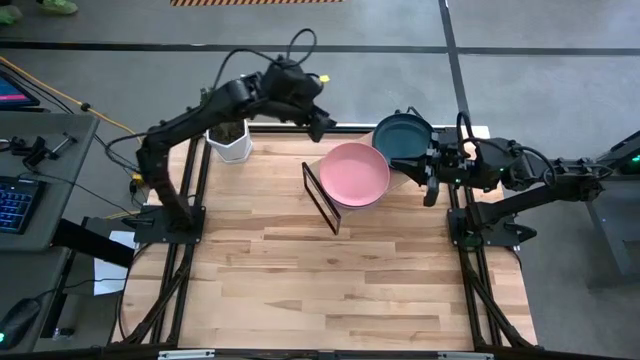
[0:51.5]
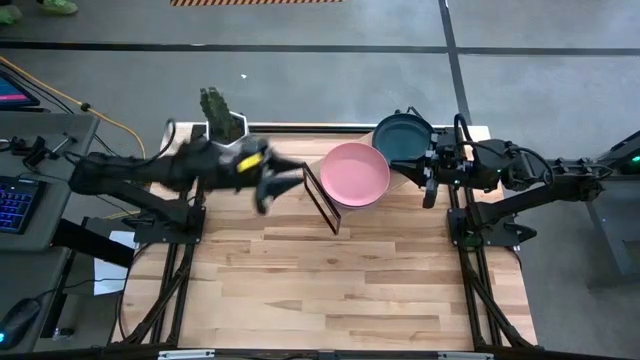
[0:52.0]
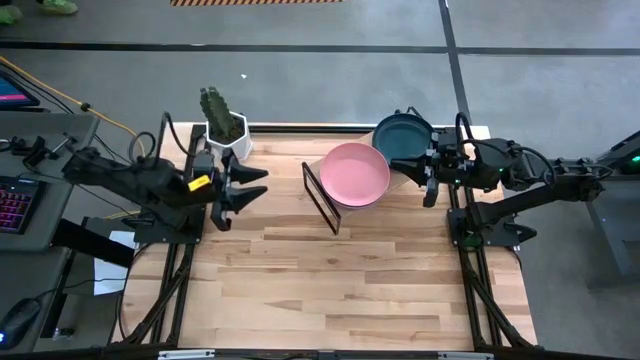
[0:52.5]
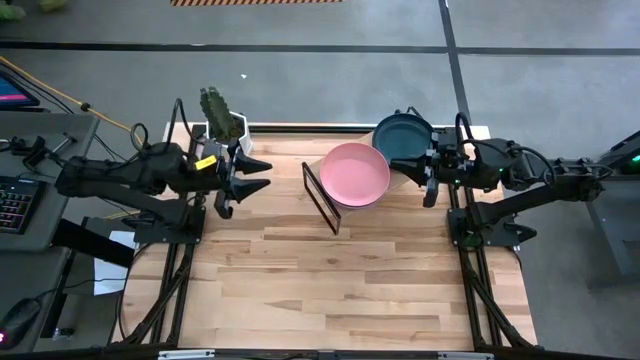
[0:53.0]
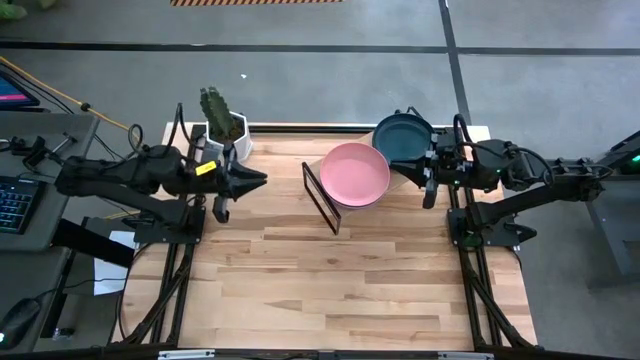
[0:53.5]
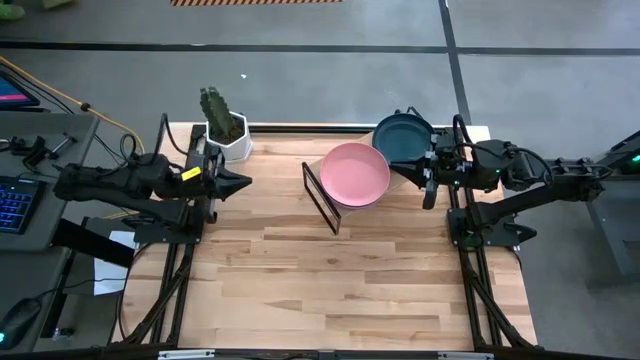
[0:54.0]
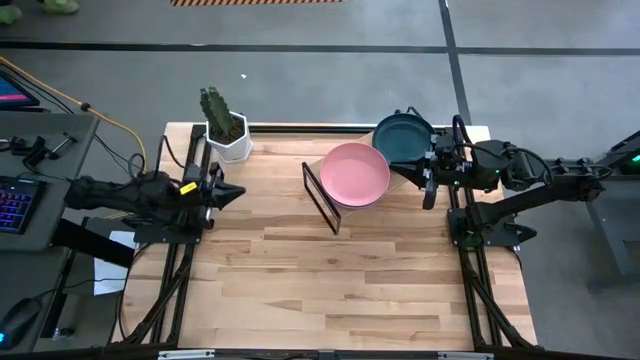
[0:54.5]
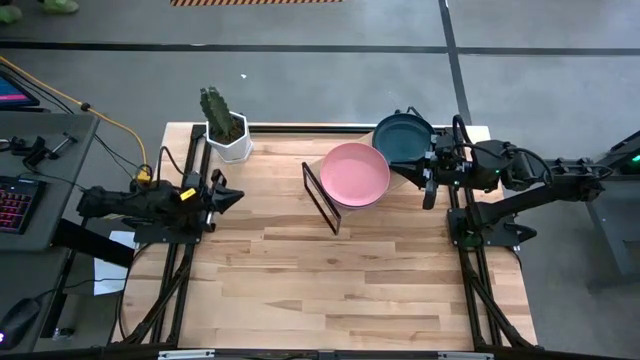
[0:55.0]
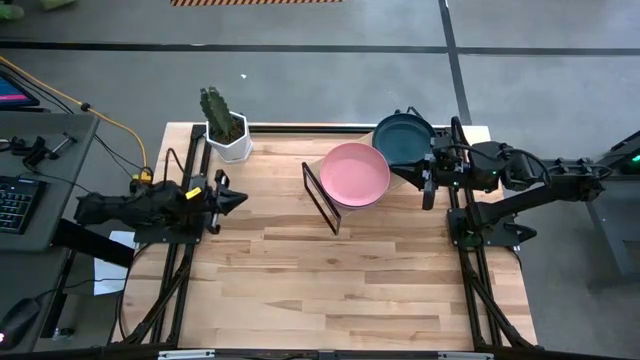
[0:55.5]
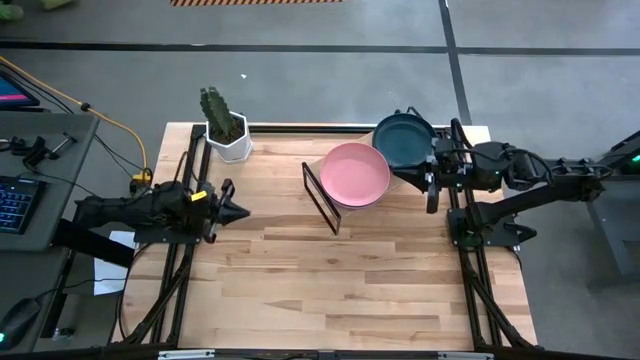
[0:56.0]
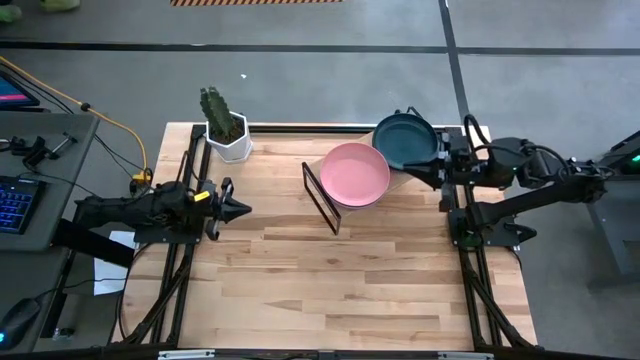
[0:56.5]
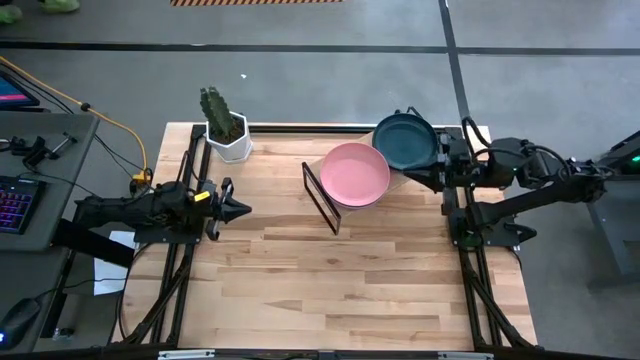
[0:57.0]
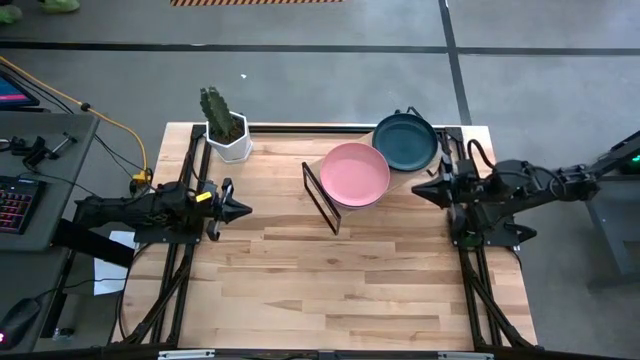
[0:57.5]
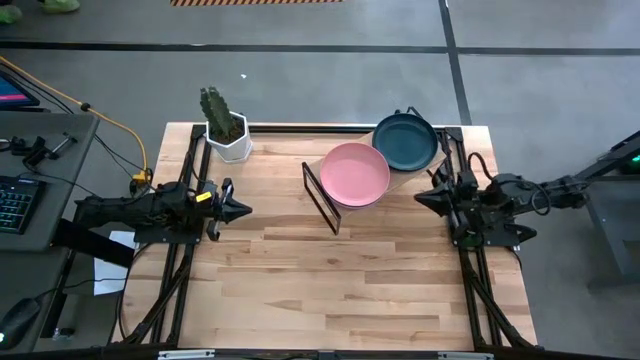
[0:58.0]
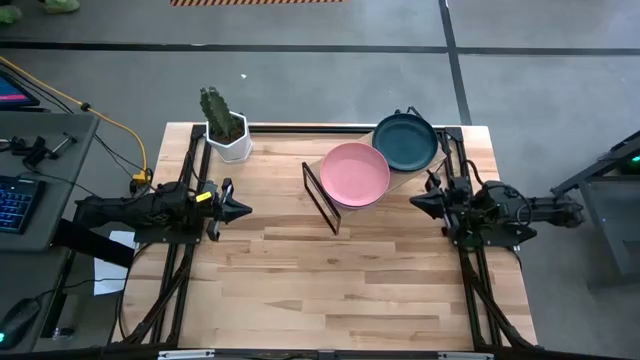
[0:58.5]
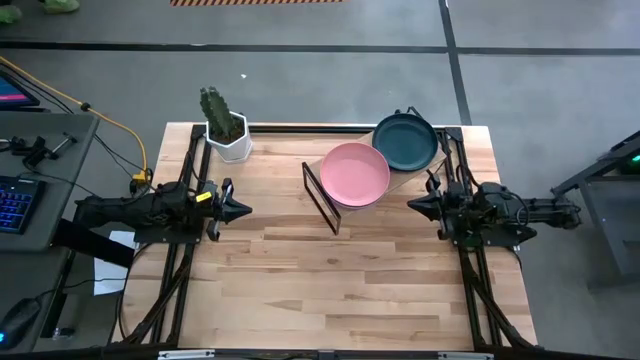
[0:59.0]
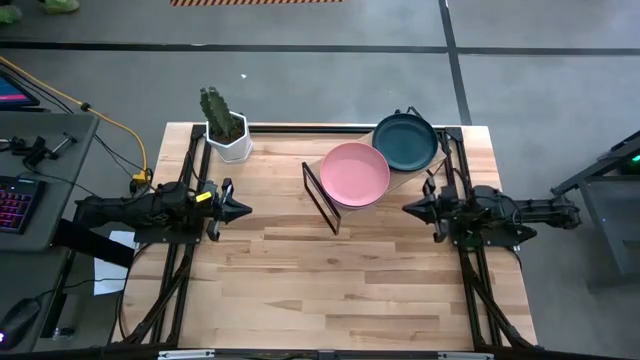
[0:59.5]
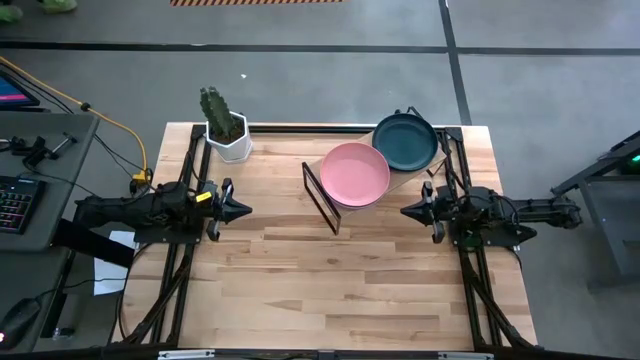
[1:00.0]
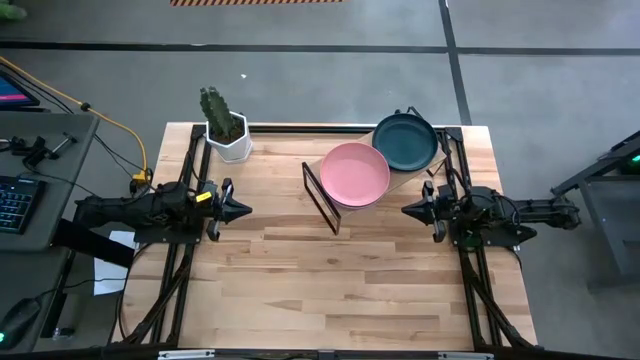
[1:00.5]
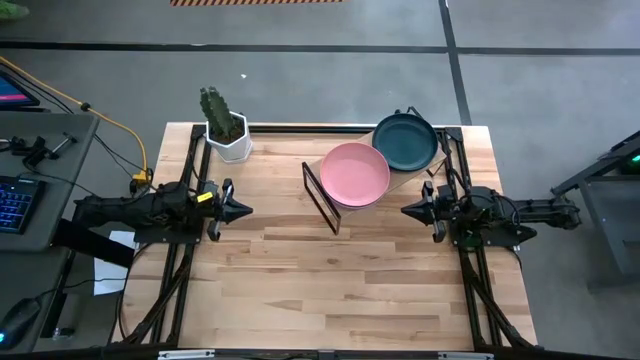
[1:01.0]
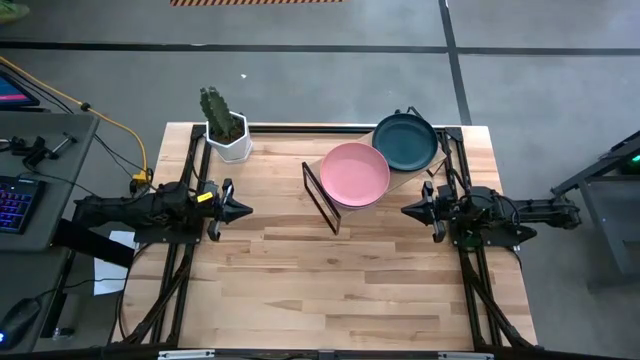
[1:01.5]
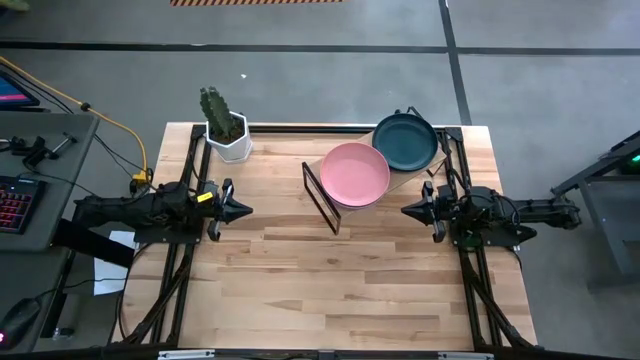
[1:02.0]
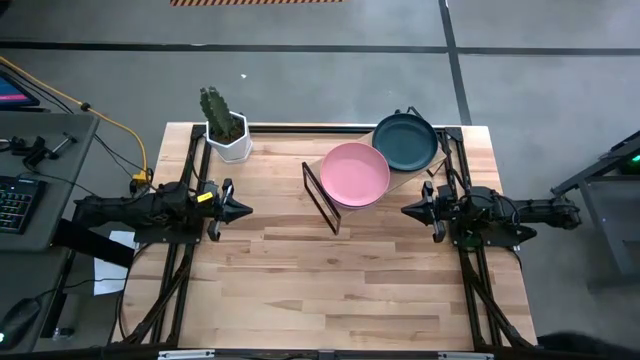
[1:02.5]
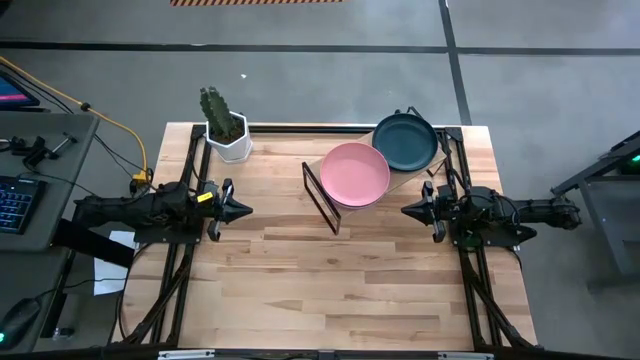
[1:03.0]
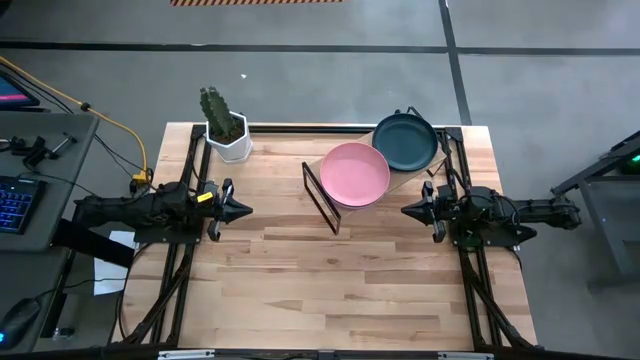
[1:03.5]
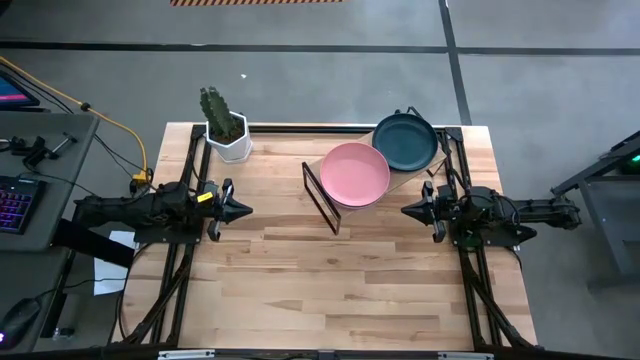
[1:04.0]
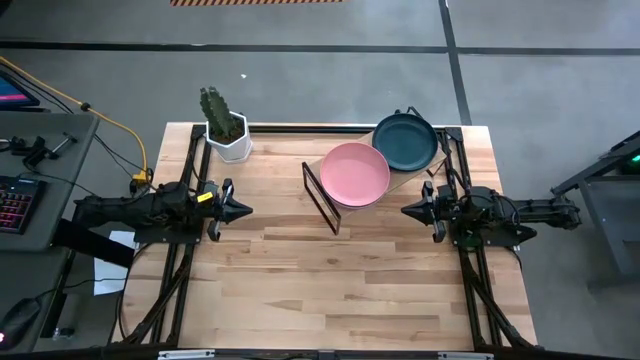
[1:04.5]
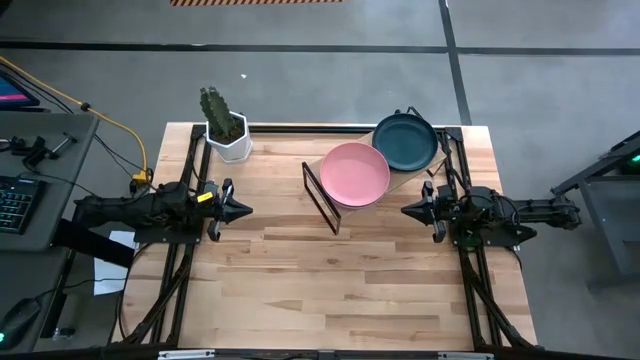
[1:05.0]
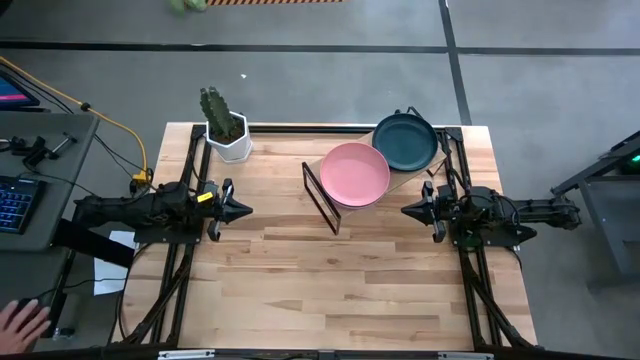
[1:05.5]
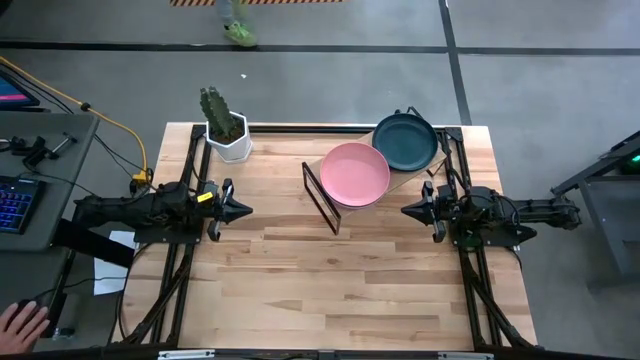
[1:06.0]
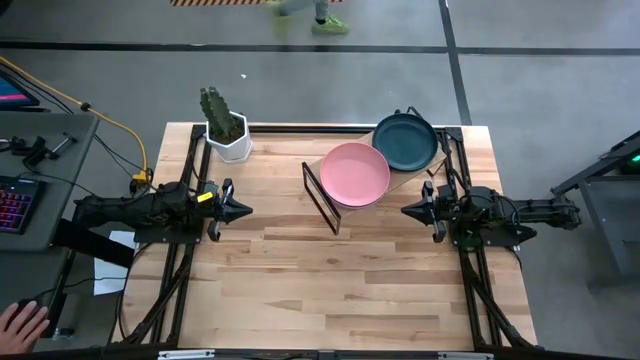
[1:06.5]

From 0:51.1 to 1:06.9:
Task: Place and stack plates onto a shelf
Return to Home Position

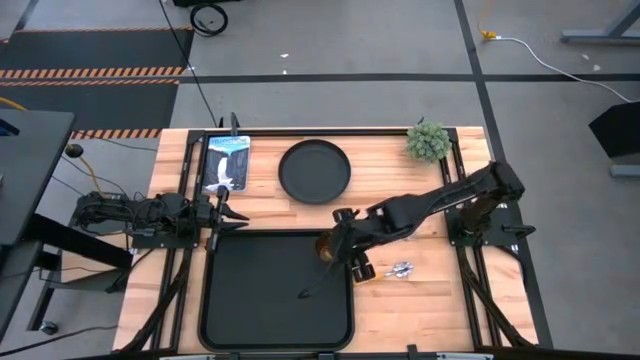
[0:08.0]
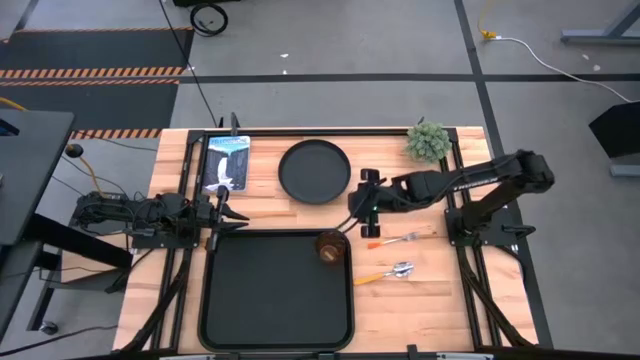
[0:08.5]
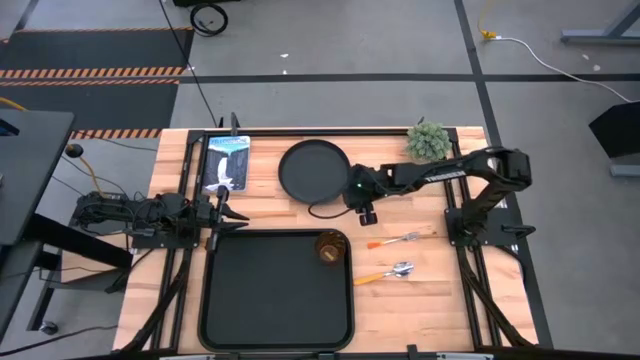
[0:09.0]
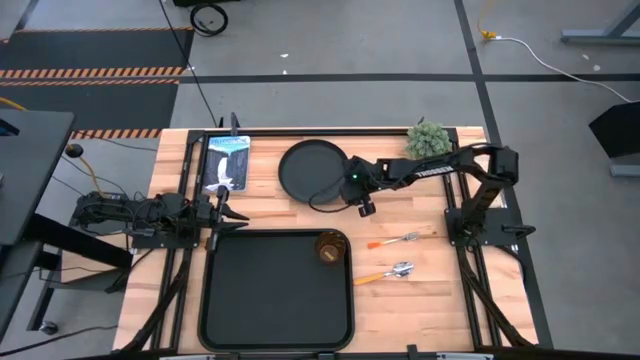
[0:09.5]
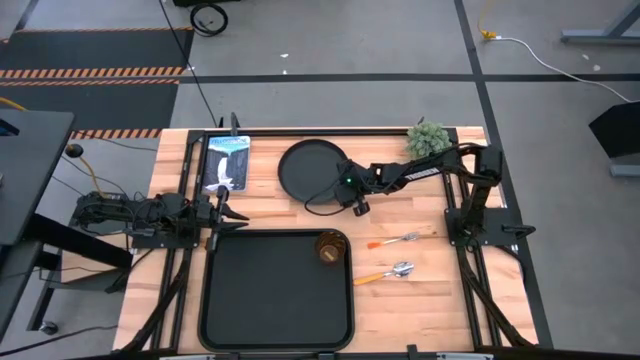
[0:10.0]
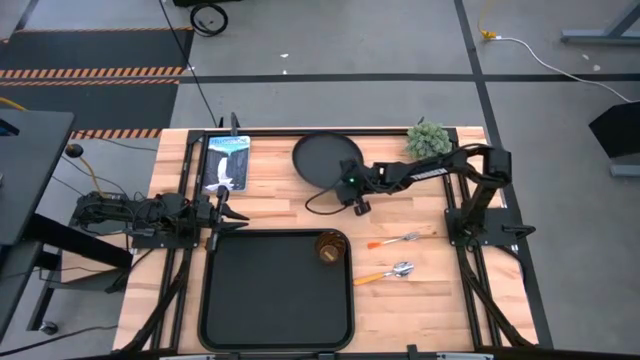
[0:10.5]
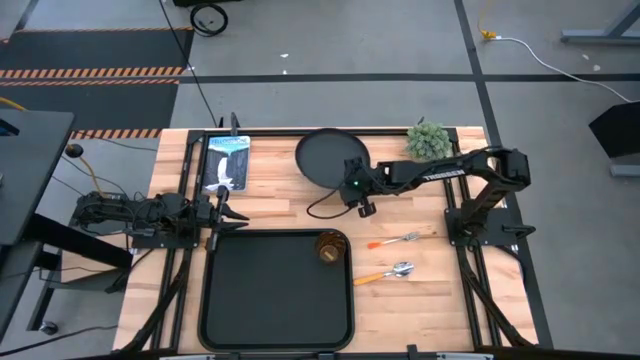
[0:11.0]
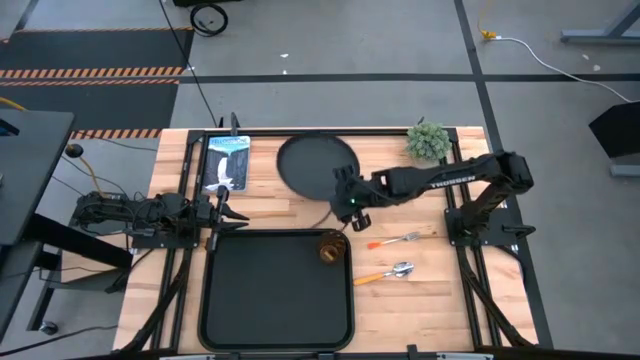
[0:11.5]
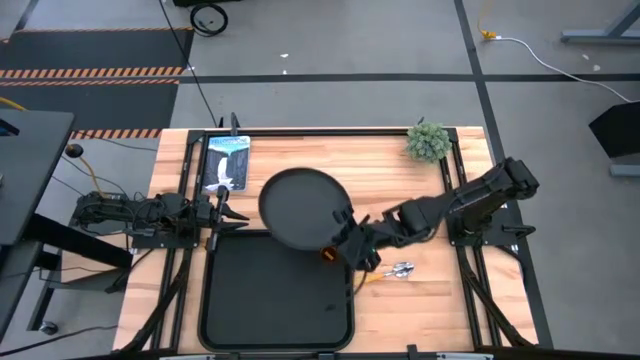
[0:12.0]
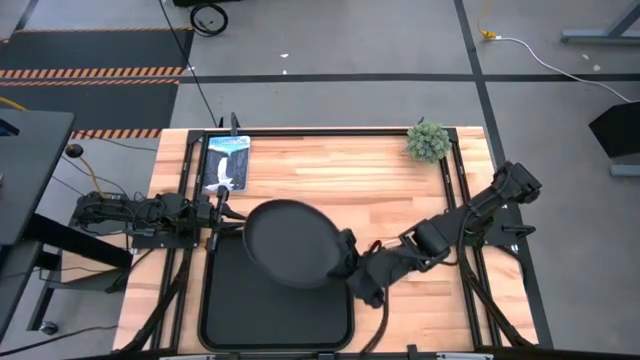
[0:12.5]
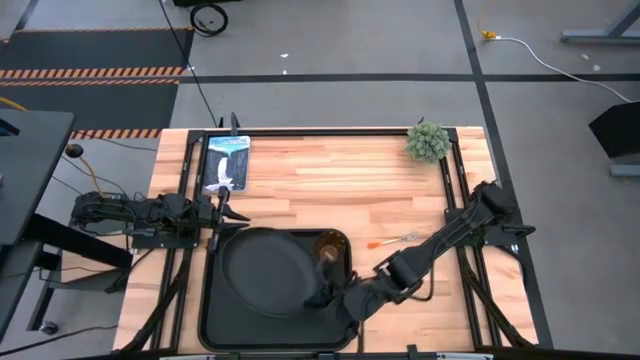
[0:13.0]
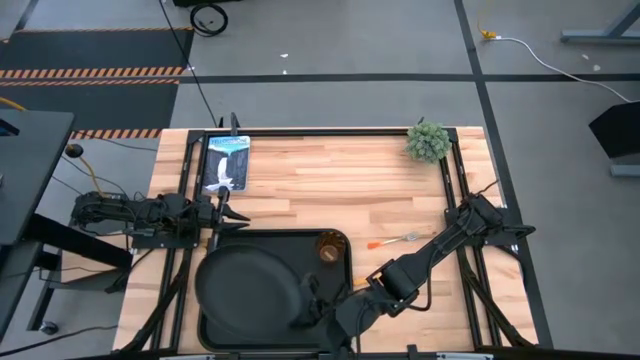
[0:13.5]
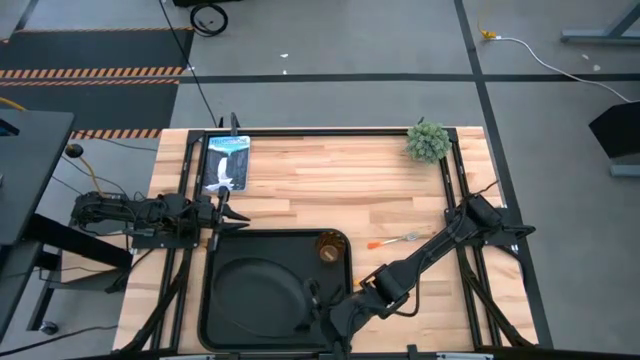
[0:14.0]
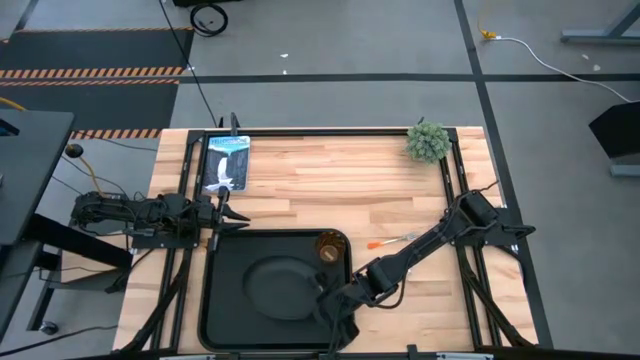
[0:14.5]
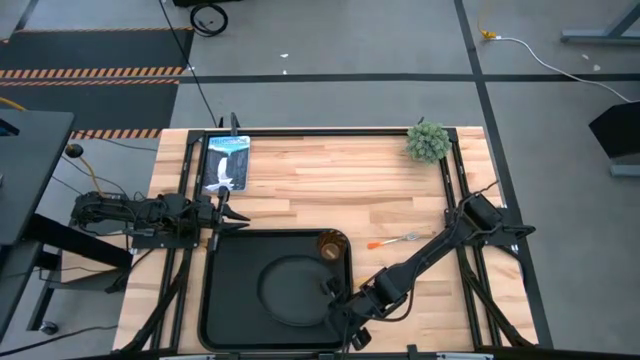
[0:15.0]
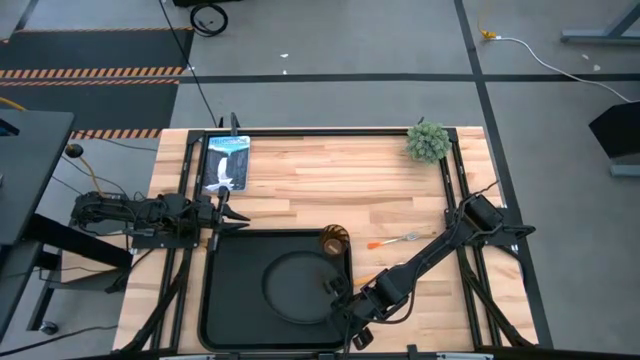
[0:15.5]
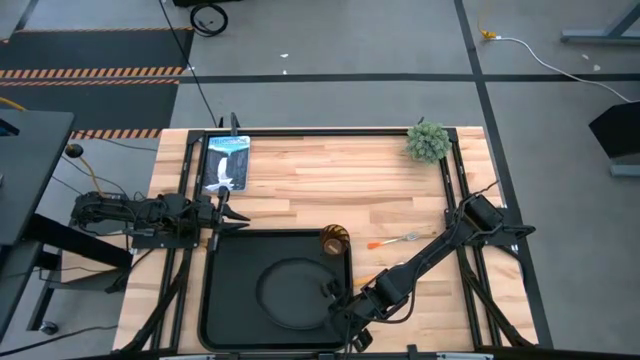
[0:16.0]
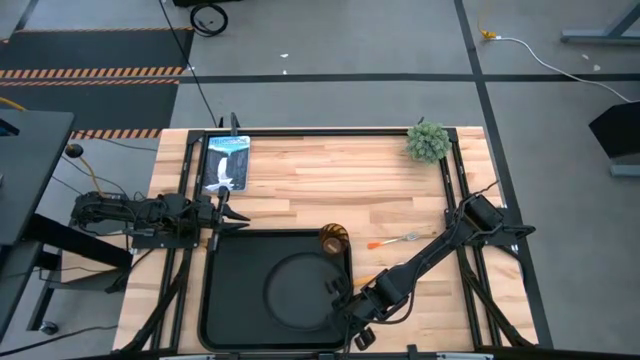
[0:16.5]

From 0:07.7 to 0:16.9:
Task: Pick and place plate/cup/fork/spoon on tray
Put the black plate on the black serving tray
